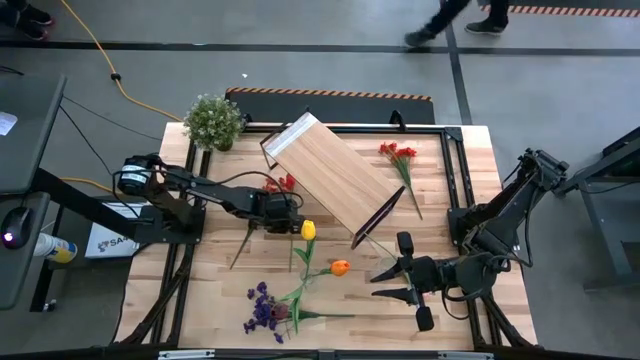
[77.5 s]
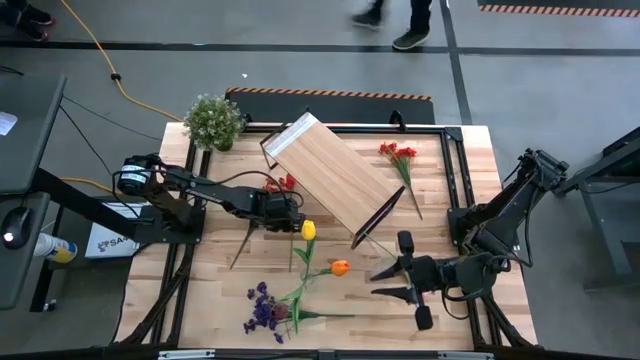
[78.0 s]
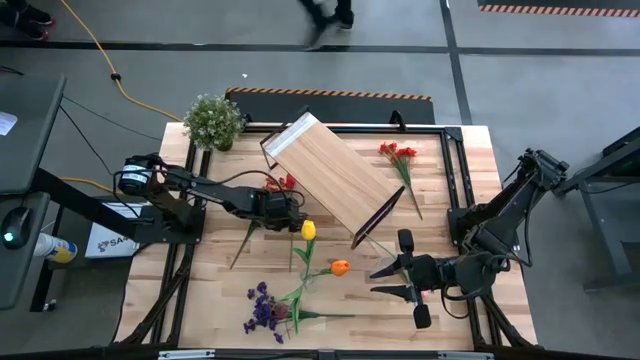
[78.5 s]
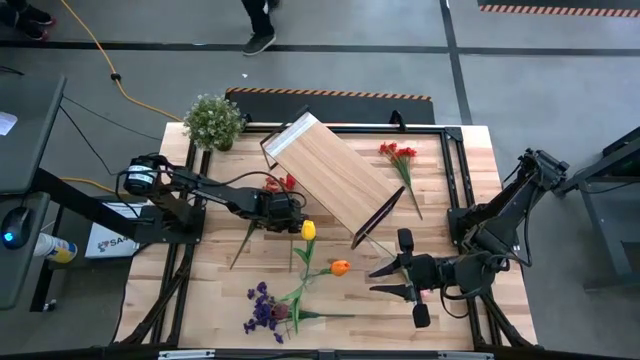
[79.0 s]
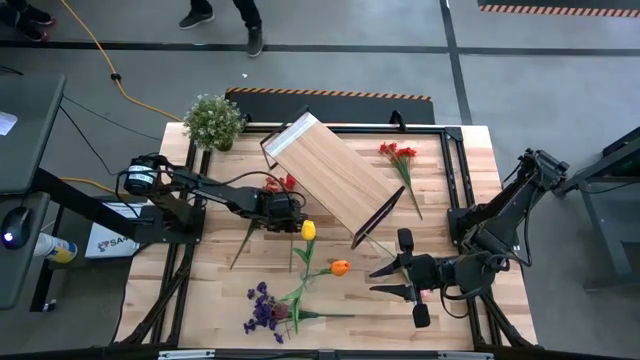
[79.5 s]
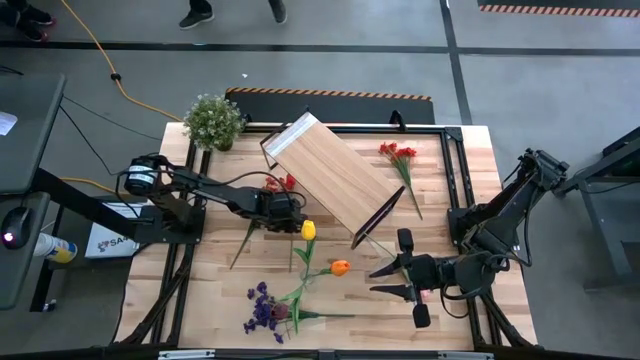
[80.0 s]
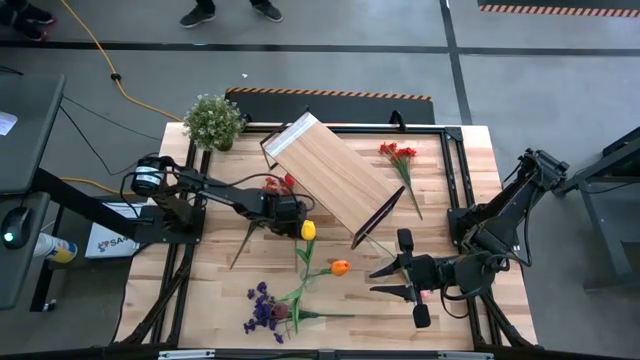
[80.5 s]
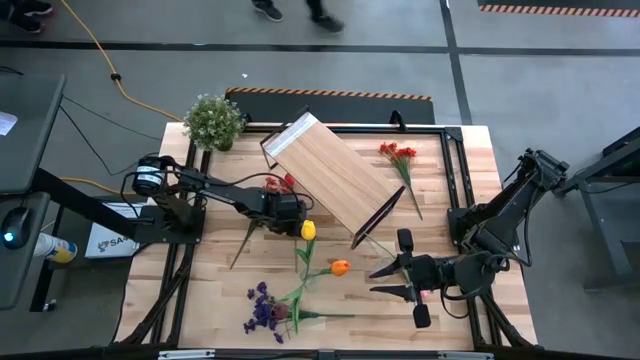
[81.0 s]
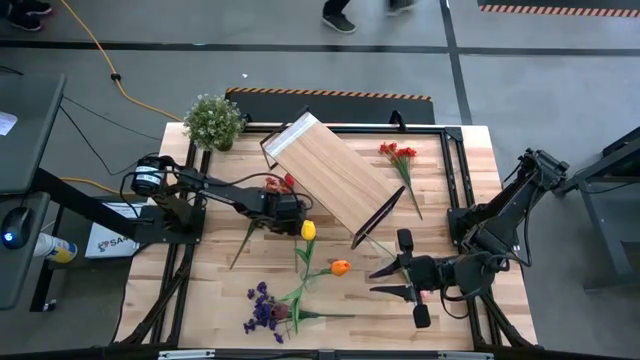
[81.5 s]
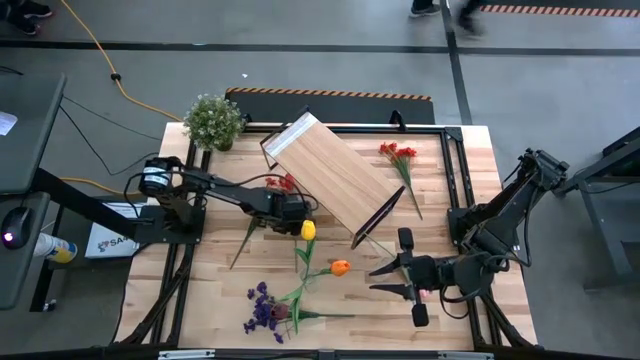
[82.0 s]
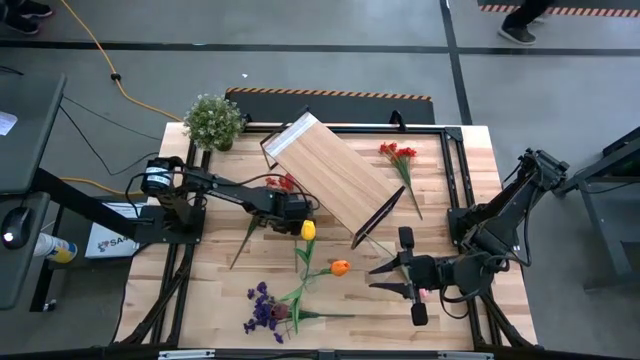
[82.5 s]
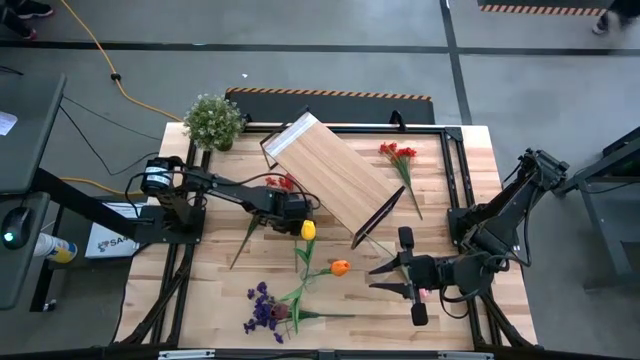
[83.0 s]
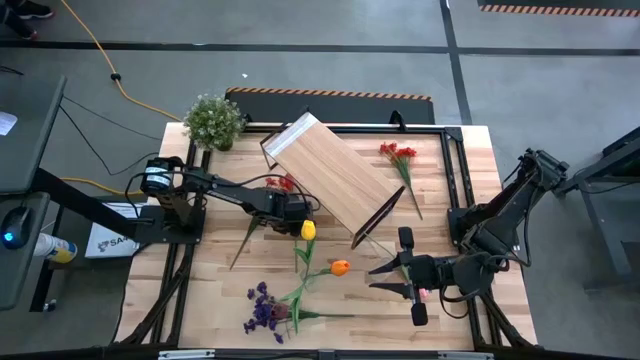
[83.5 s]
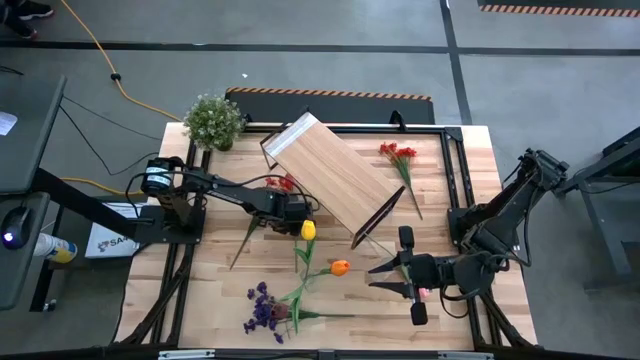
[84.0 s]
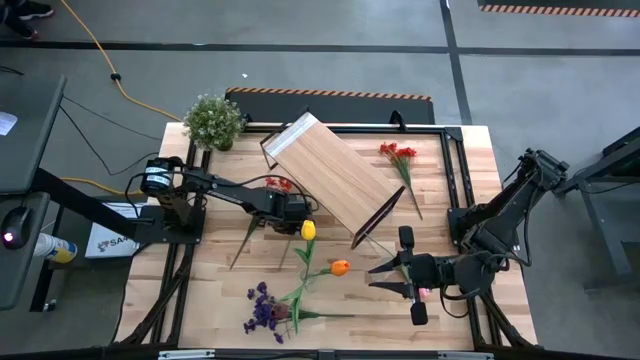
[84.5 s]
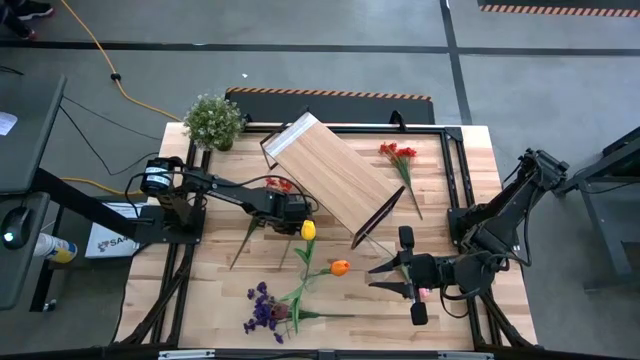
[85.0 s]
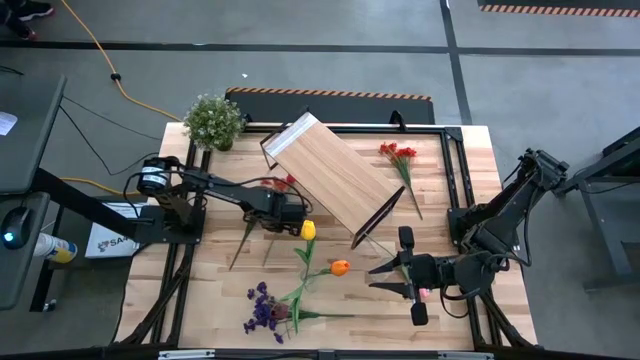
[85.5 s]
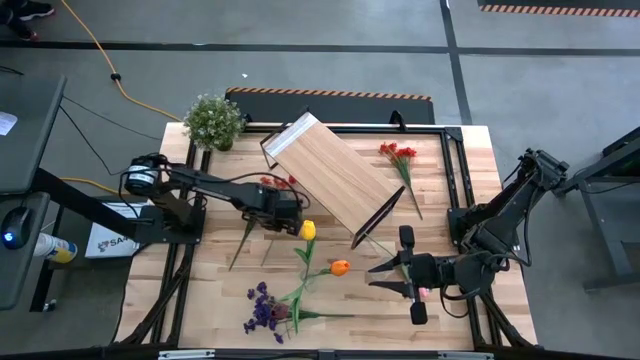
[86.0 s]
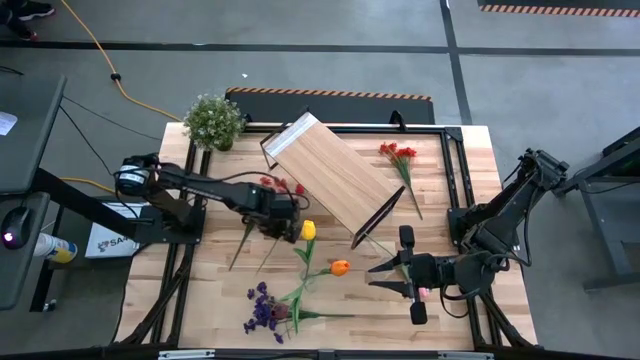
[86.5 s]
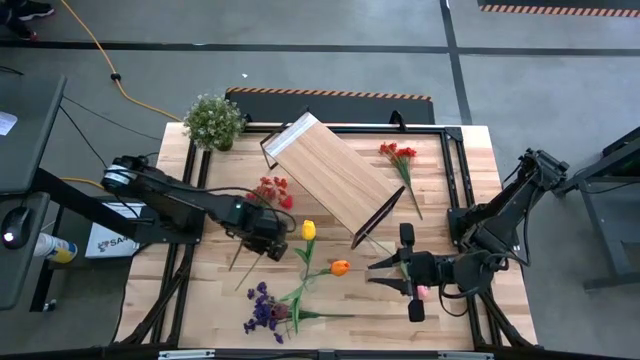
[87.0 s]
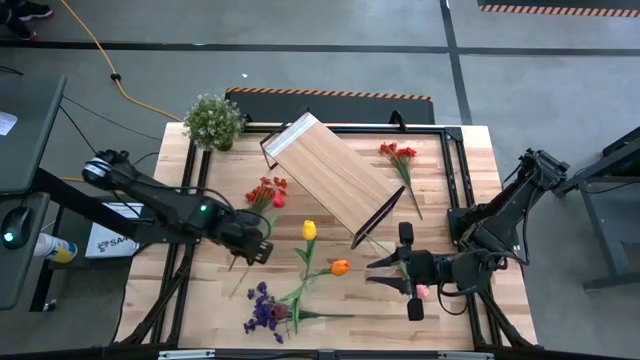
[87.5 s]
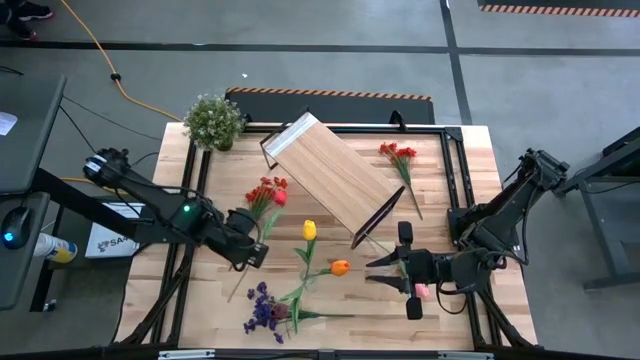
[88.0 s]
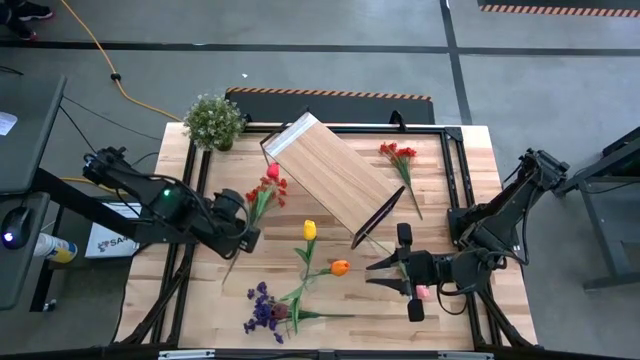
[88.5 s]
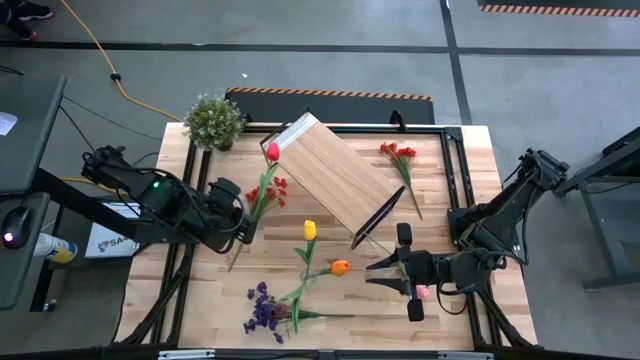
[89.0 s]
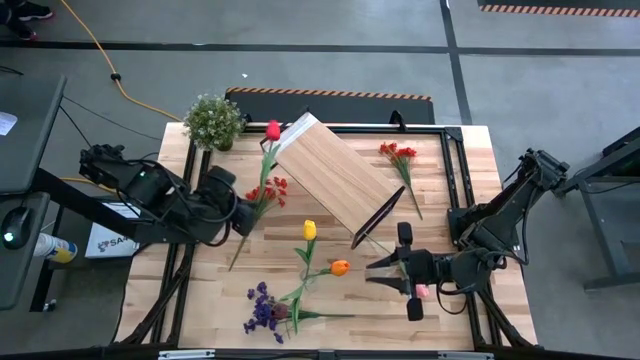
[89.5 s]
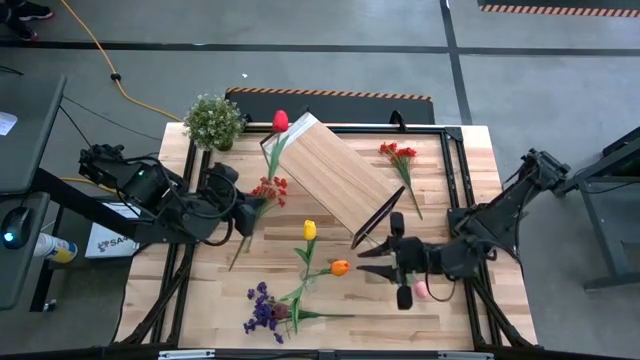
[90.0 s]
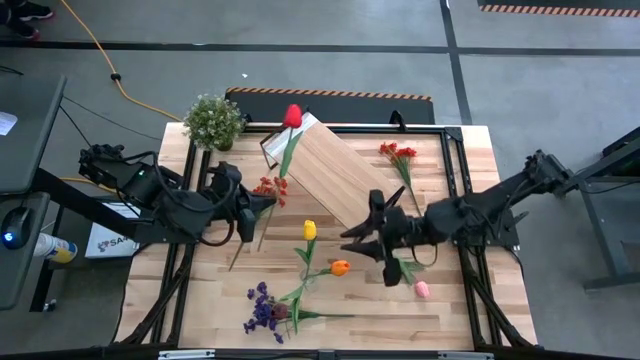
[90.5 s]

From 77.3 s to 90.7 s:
Task: Pick and place flowers into a vace then onto a shelf
Put the red tulip into the left transparent vase

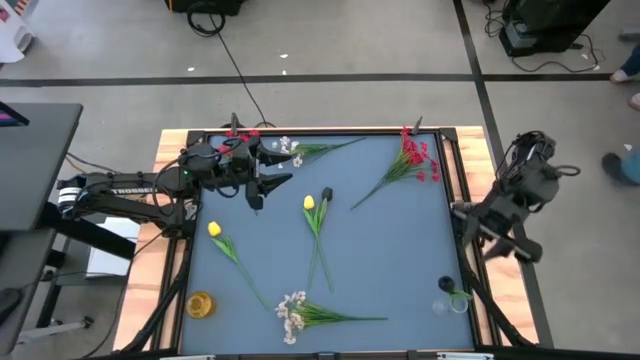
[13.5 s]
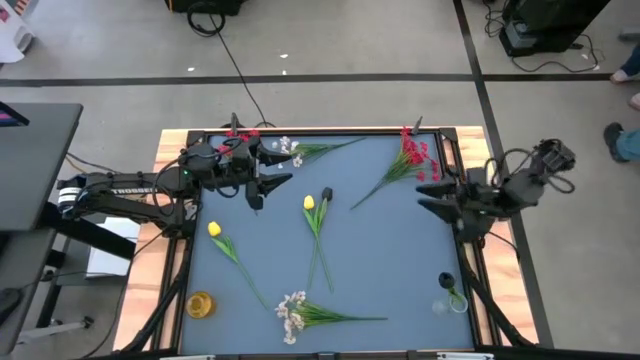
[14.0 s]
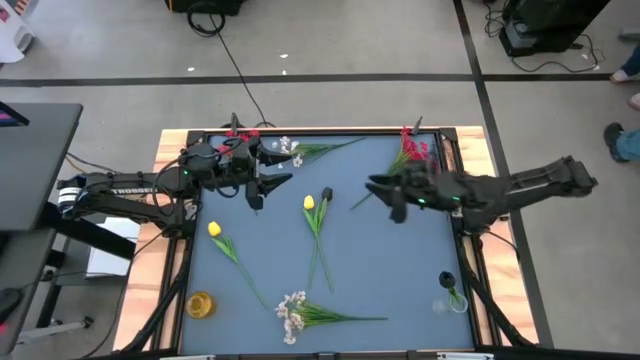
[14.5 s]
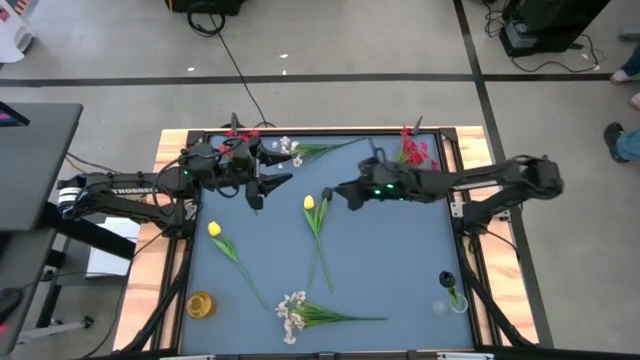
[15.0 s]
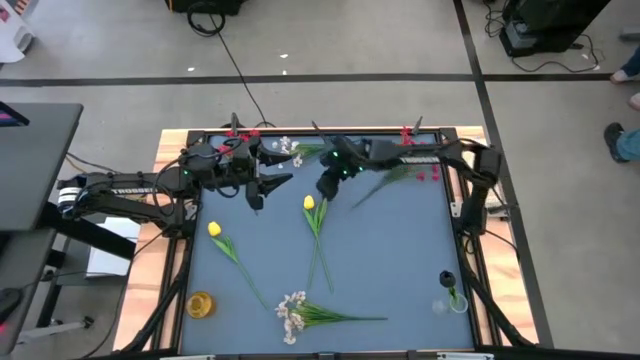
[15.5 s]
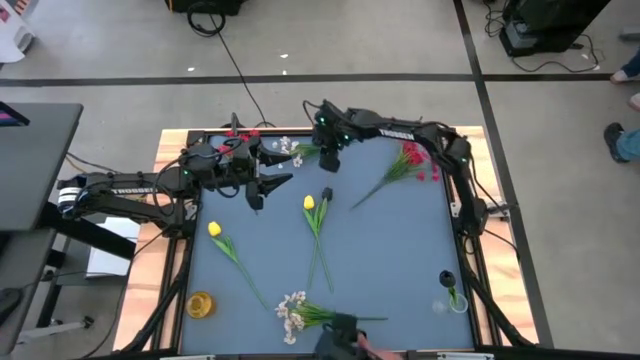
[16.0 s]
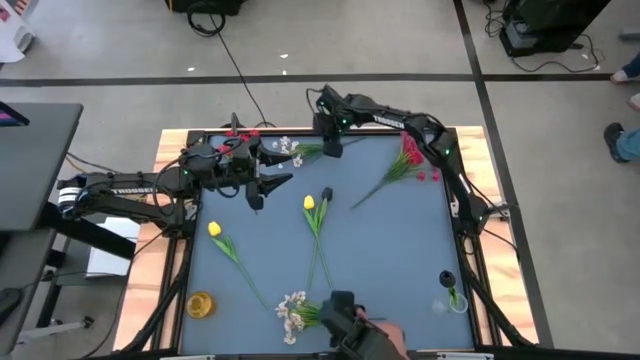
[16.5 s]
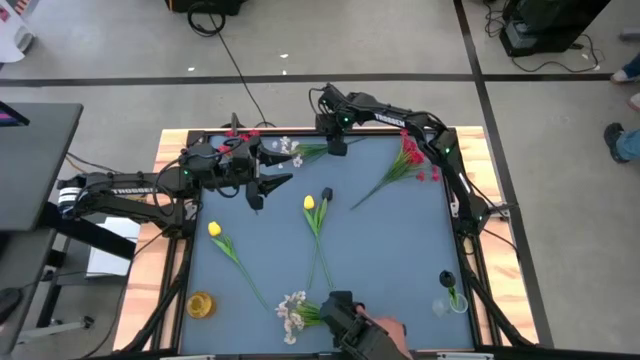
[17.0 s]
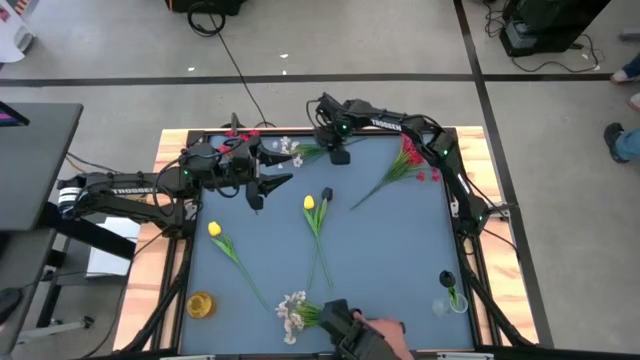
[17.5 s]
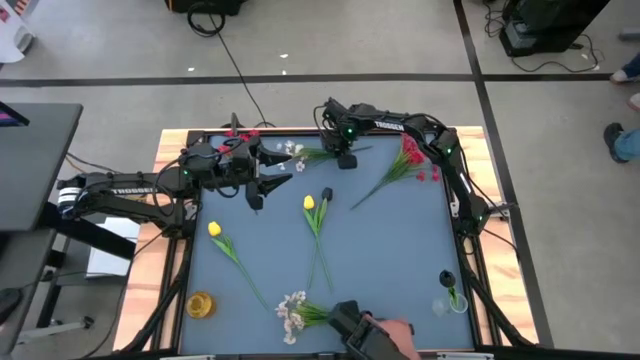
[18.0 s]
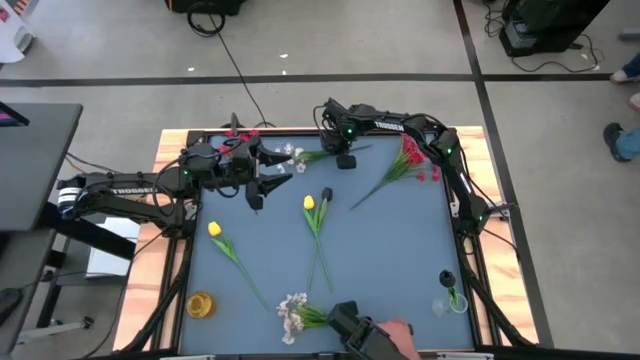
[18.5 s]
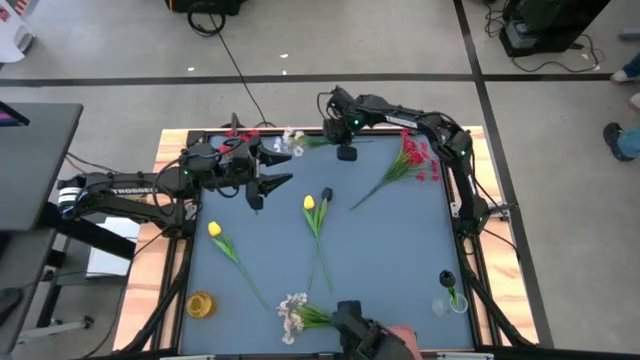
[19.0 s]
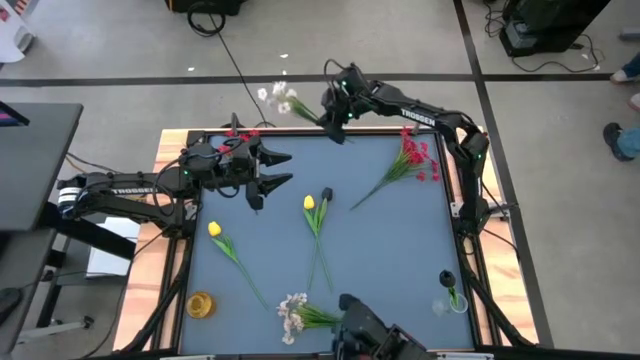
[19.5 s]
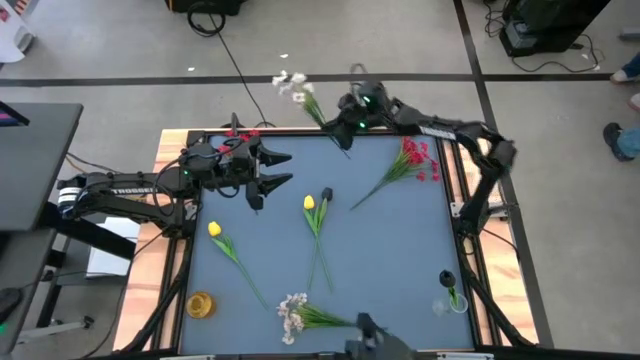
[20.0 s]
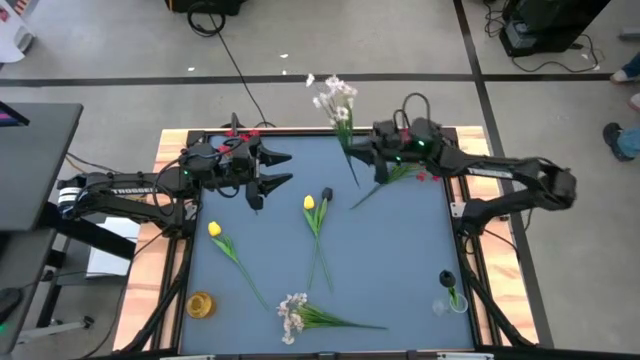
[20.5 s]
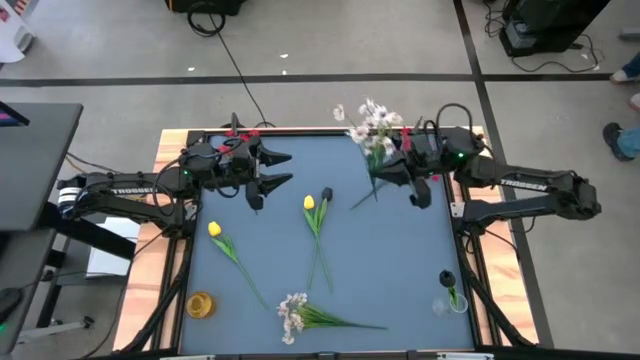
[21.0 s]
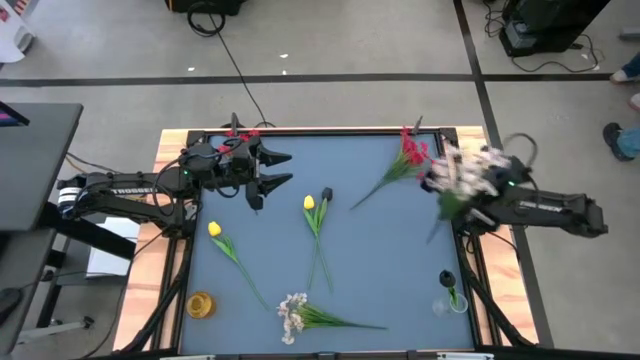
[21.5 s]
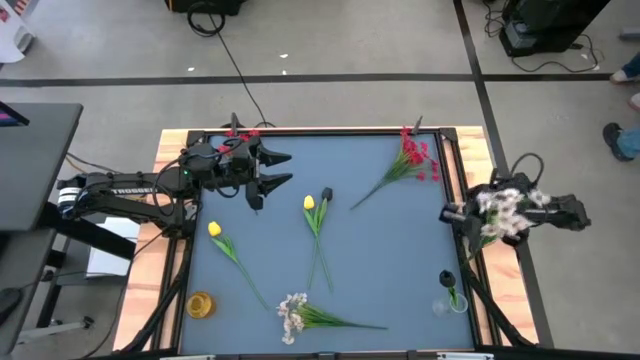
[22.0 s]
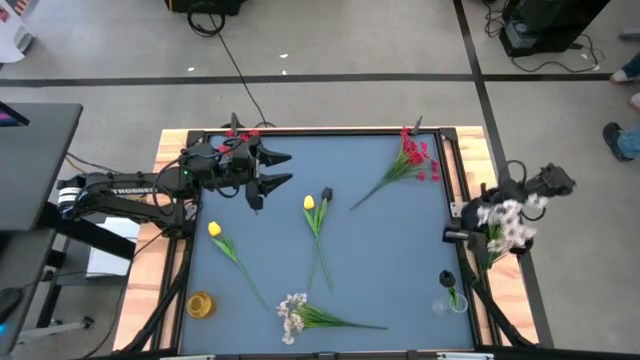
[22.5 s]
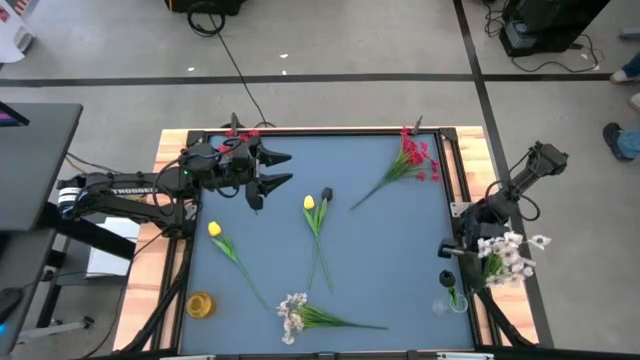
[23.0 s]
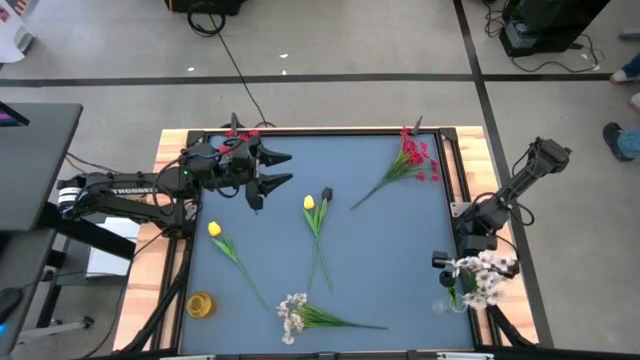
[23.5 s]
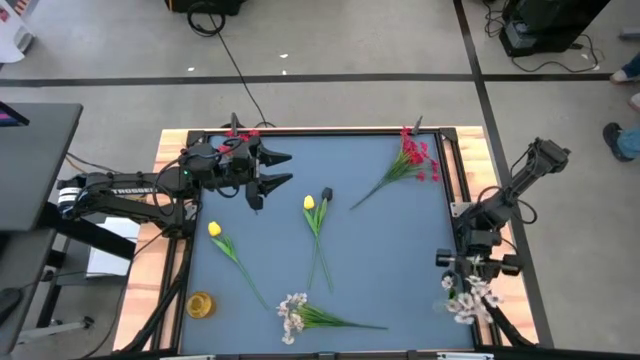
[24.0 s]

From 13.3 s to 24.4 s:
Task: Sort flowers into vase by color
Put the top white flowers into the transparent vase
